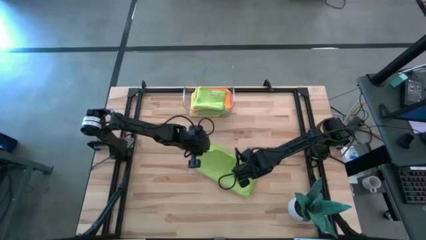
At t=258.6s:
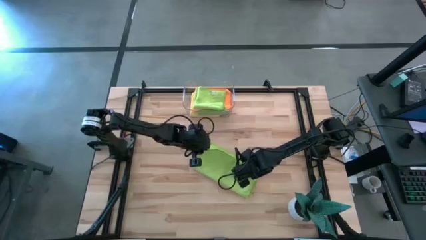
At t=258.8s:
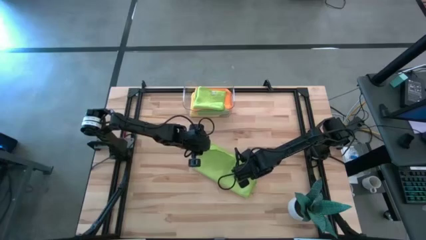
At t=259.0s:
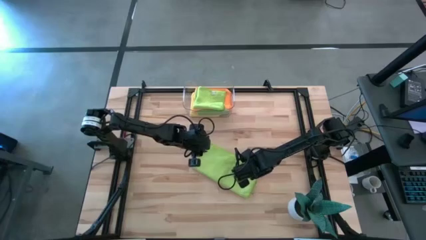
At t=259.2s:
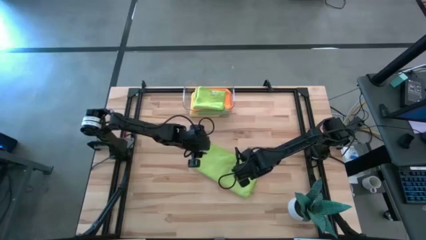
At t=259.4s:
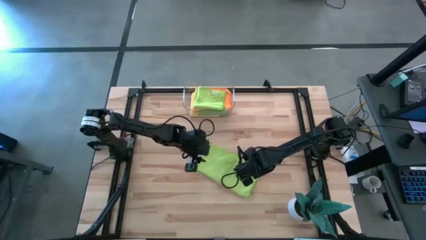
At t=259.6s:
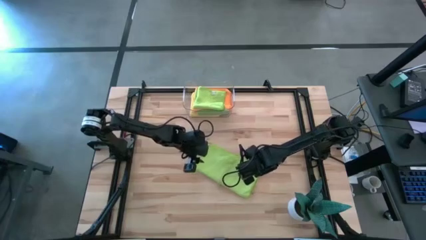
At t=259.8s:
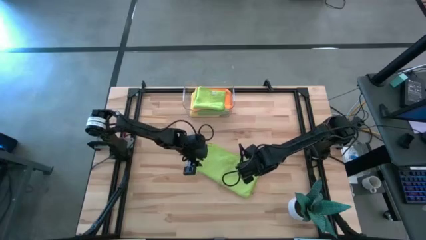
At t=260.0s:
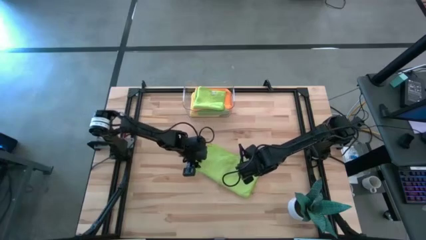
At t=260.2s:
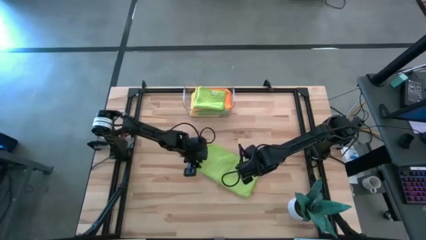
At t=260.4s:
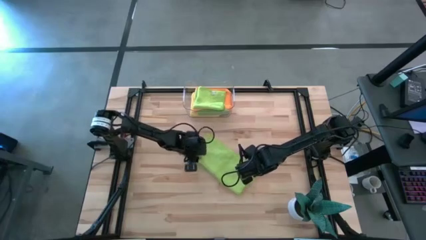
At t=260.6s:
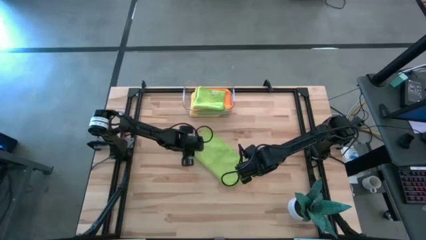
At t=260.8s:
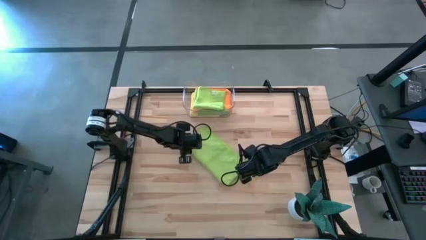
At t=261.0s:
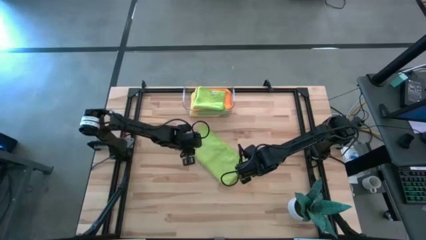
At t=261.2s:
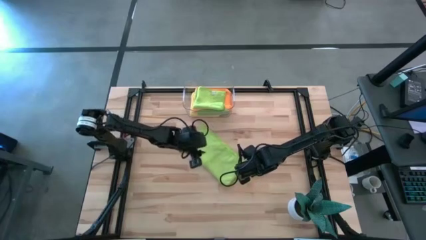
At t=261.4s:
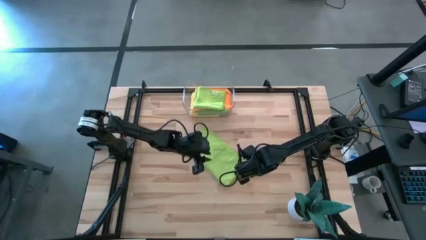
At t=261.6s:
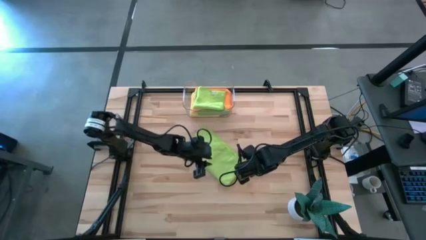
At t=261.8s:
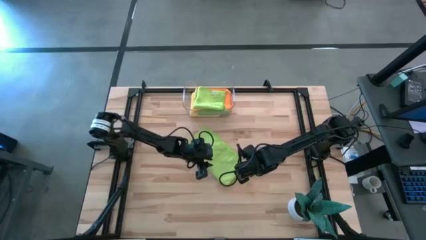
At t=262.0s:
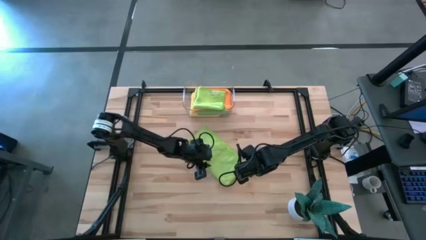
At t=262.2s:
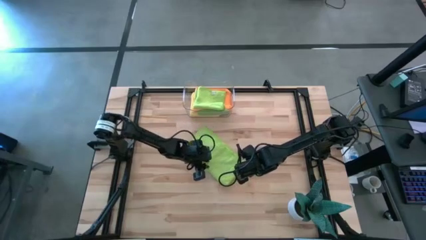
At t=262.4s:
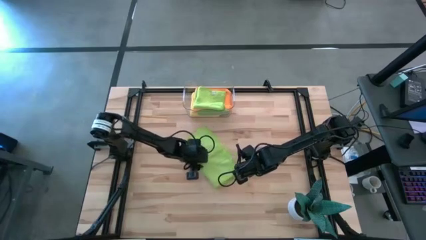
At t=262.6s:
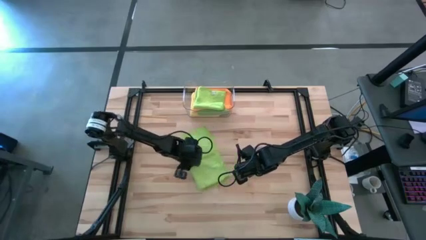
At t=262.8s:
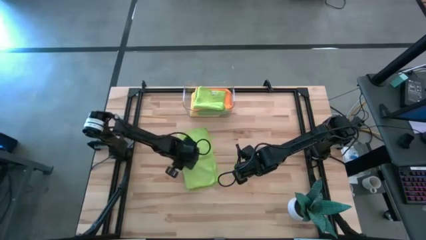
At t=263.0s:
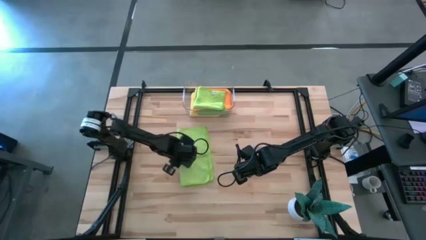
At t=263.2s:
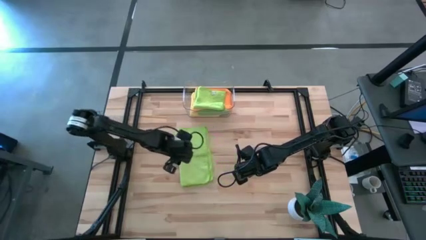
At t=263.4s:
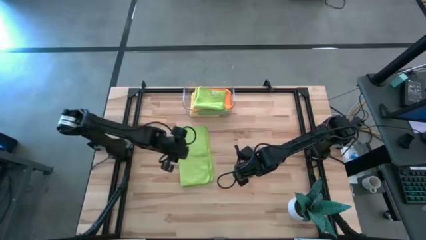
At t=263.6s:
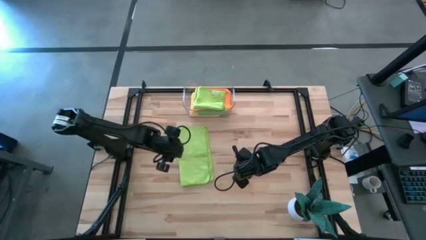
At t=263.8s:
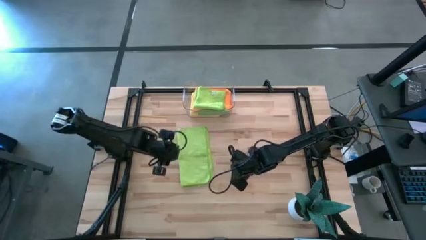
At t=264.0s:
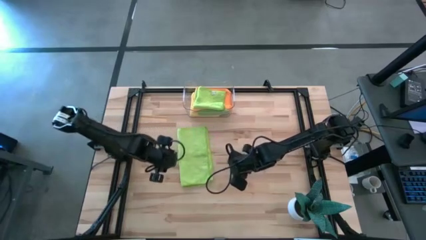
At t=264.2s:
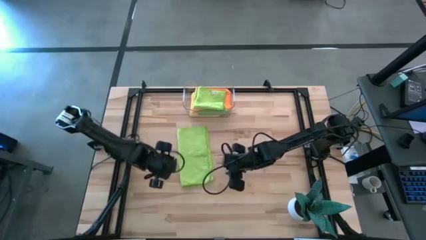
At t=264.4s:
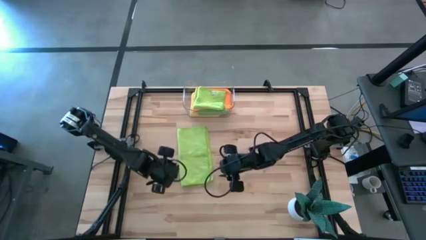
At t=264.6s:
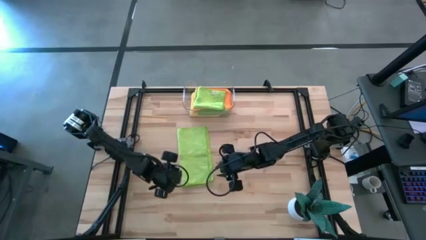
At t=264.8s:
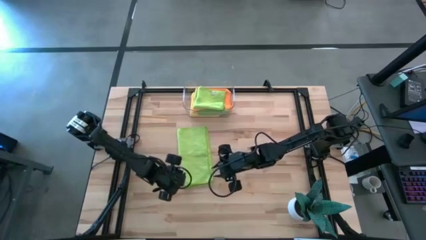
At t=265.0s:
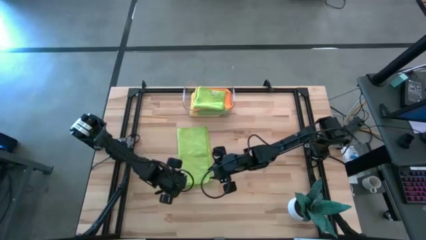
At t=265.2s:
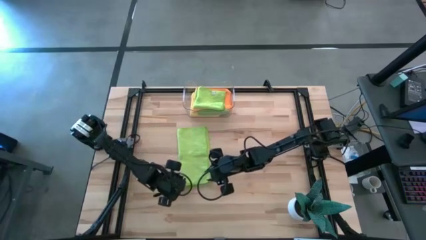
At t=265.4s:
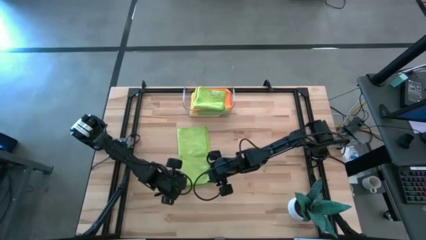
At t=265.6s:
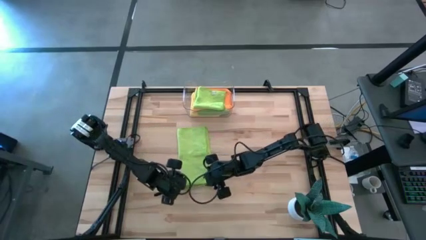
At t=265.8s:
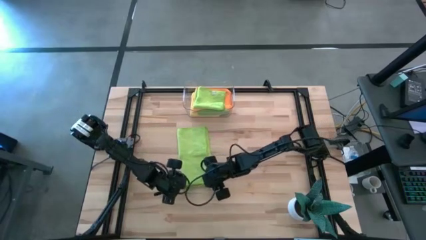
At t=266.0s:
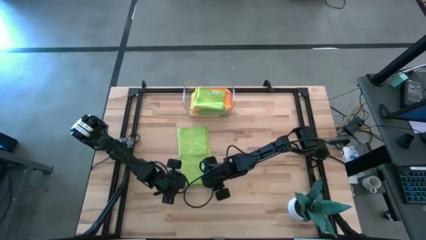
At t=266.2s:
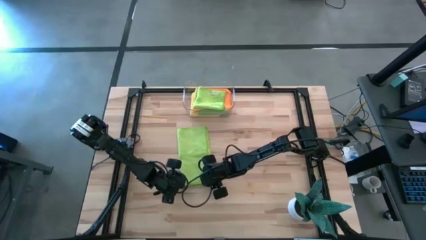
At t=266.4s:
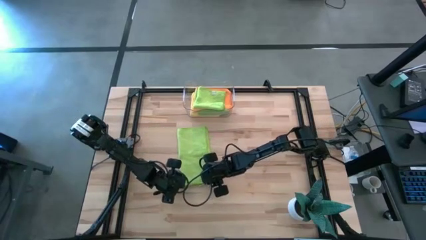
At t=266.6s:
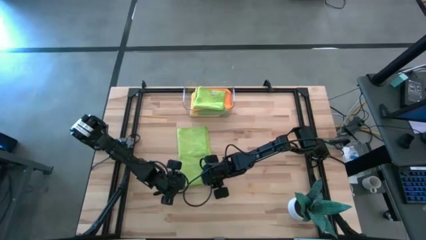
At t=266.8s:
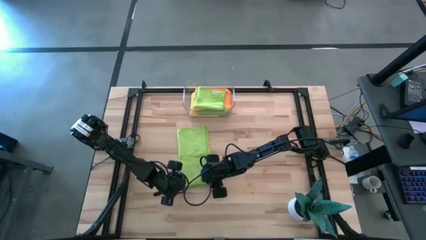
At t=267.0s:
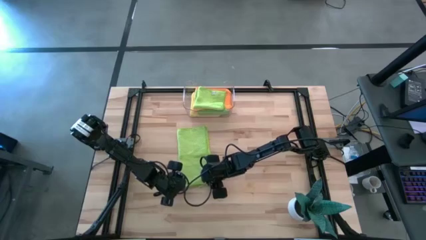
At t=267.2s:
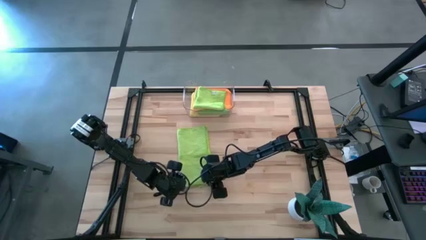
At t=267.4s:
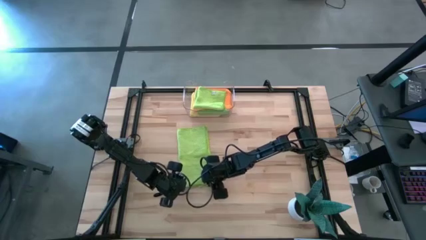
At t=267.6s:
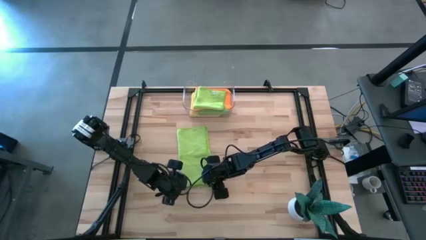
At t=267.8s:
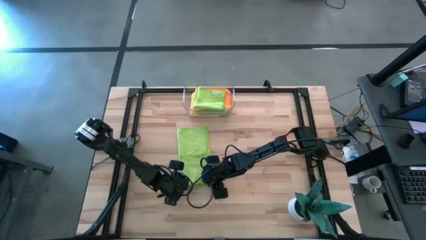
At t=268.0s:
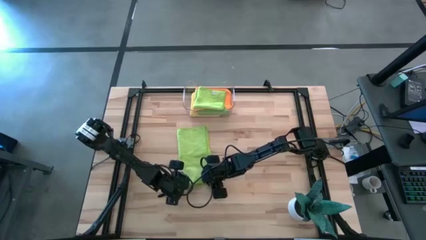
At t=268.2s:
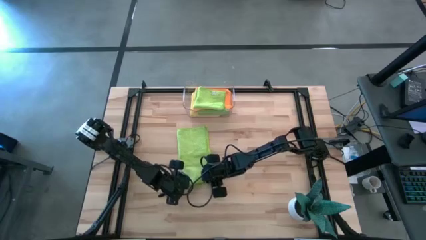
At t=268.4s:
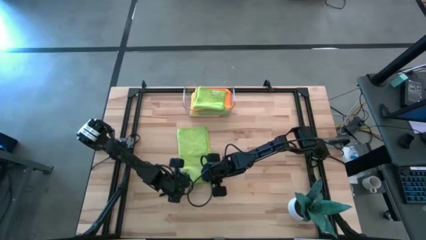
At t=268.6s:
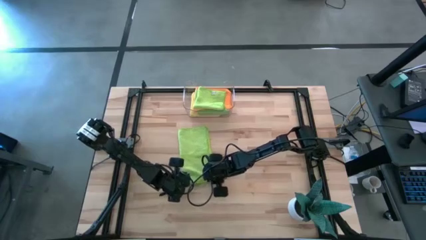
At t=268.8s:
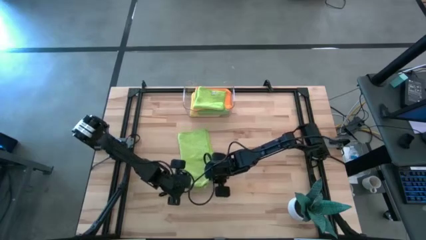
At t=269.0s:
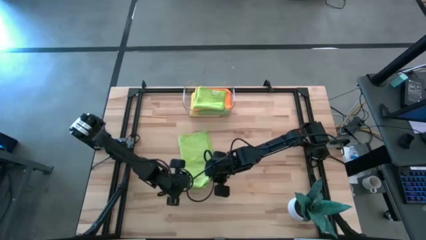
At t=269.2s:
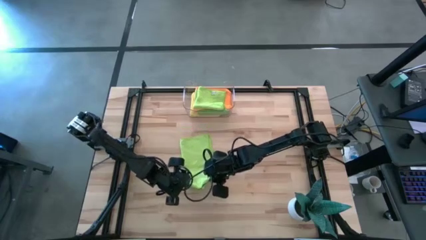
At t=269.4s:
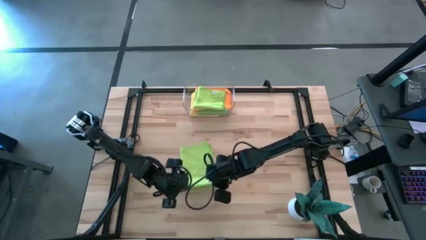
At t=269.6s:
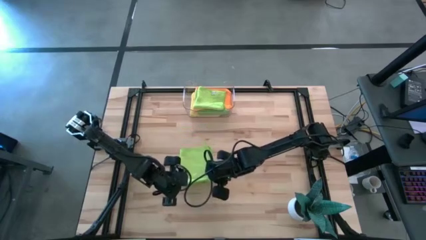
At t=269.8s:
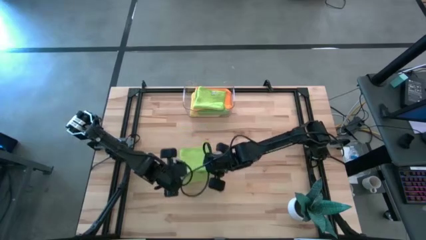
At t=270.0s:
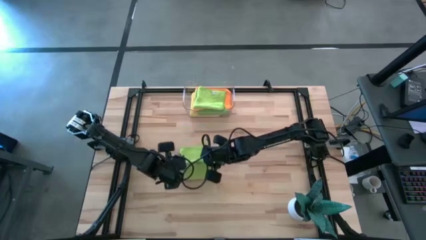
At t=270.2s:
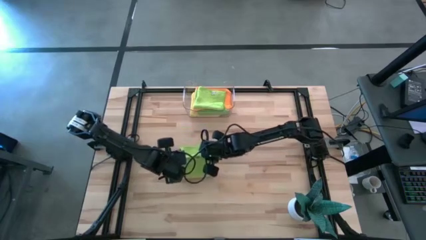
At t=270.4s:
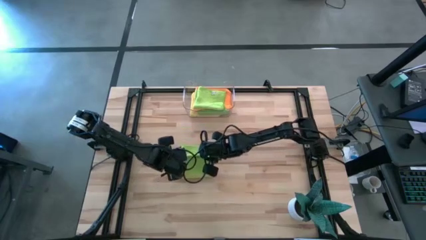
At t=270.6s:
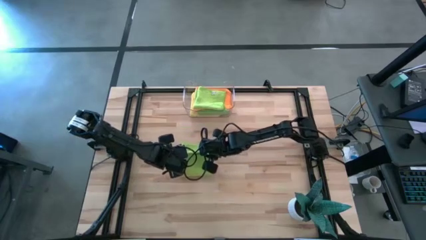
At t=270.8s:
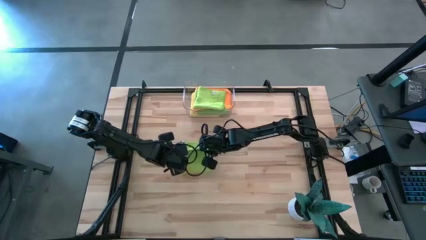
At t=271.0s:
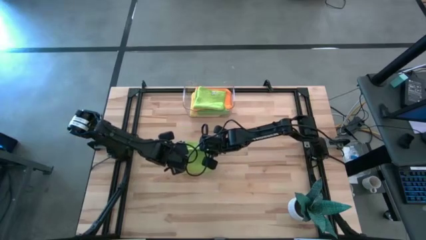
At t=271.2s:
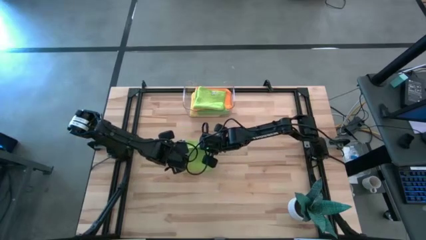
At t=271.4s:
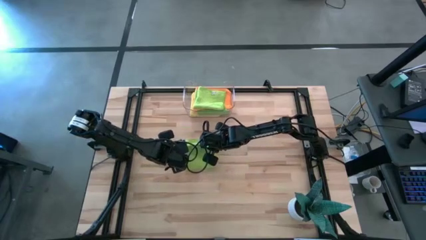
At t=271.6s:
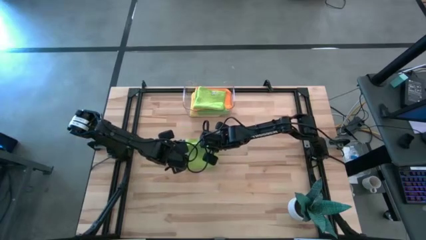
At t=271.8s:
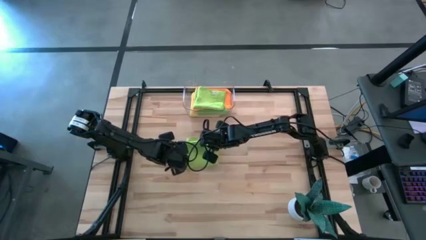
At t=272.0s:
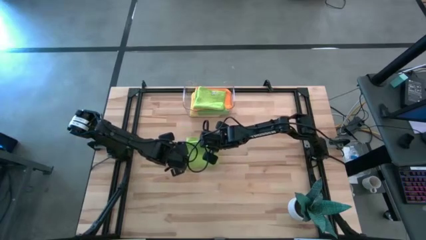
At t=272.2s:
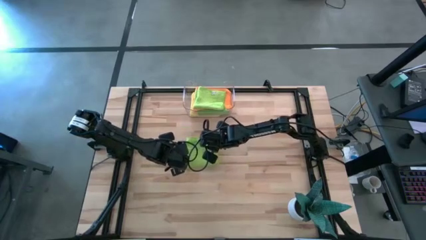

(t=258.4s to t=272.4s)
Task: Fold microfiber towels
Fold the light green microfiber cloth
